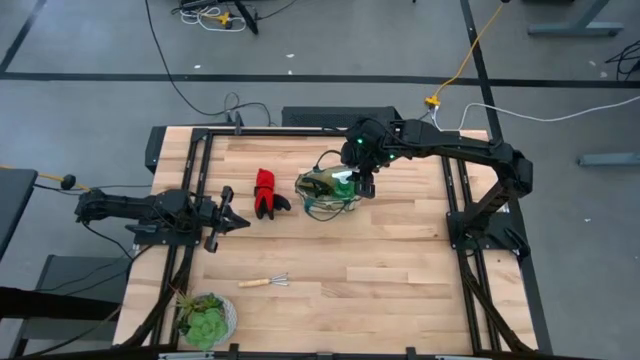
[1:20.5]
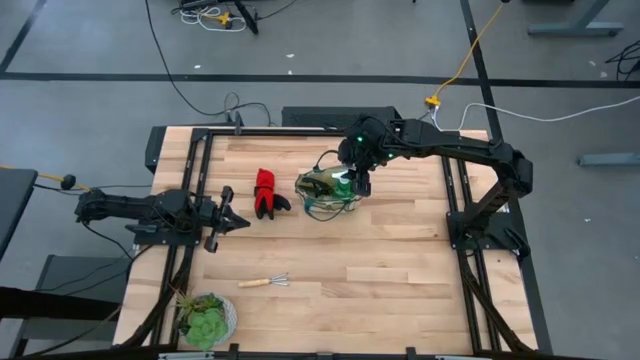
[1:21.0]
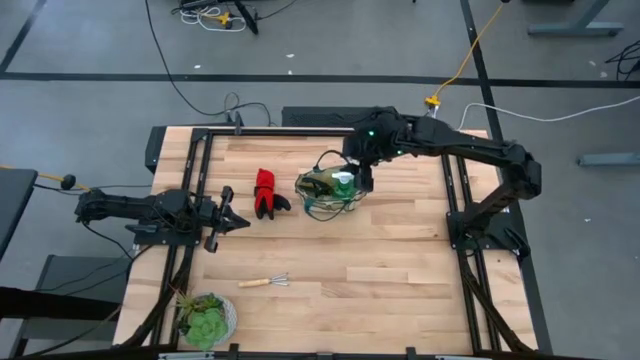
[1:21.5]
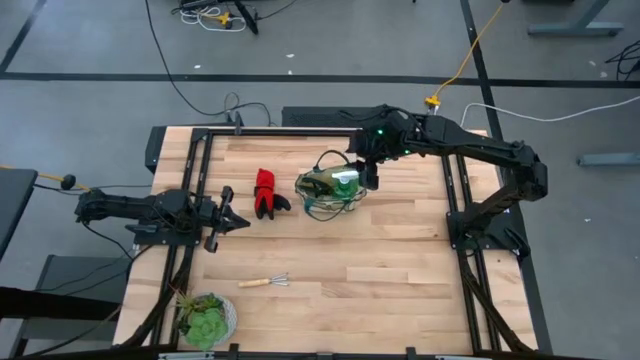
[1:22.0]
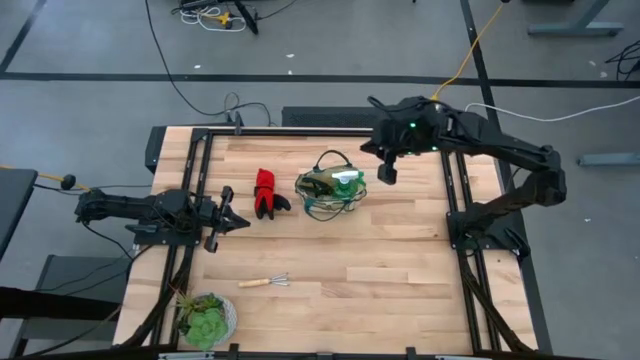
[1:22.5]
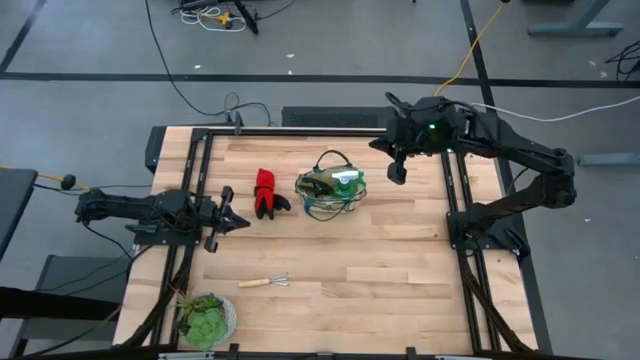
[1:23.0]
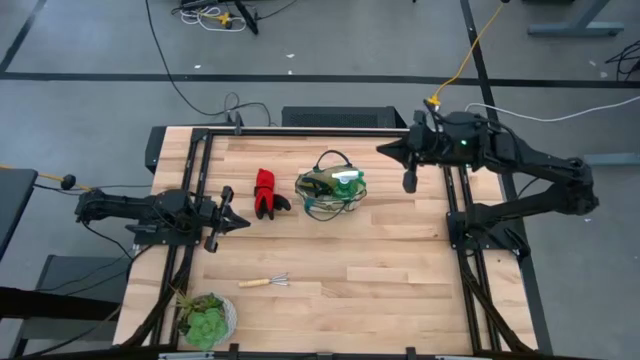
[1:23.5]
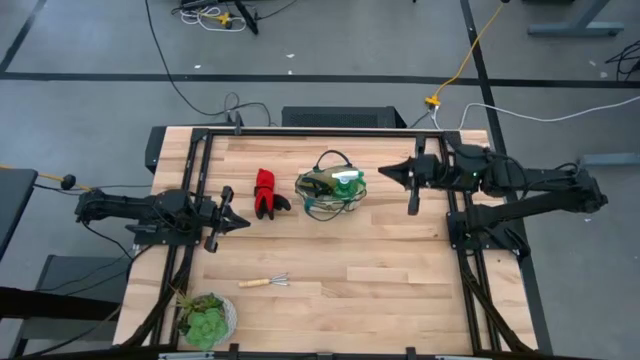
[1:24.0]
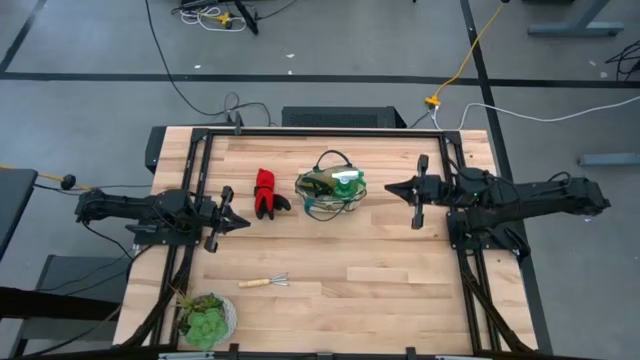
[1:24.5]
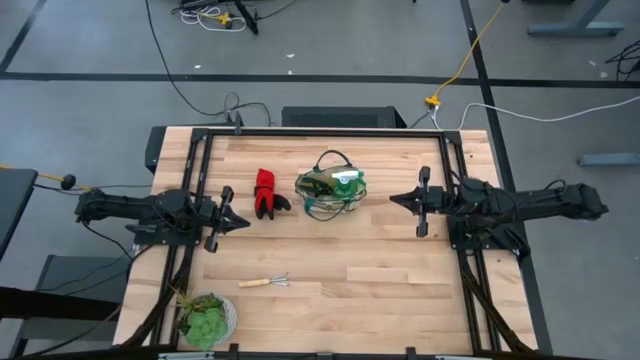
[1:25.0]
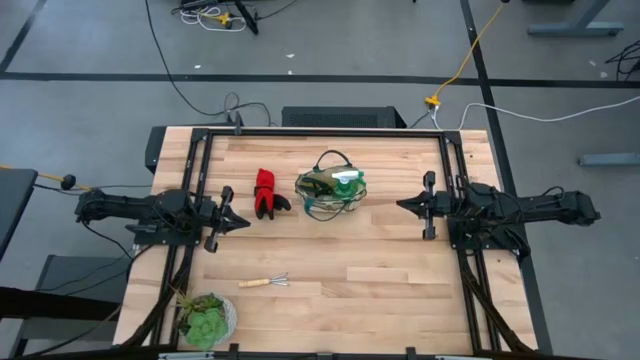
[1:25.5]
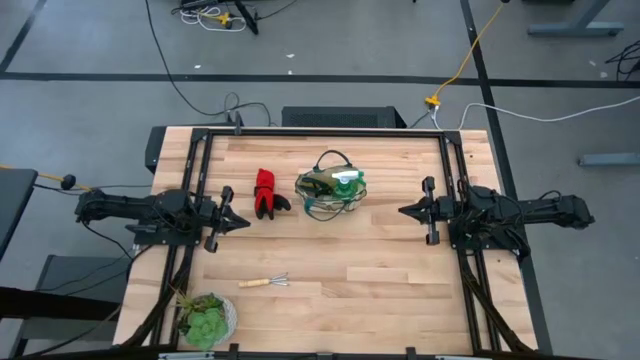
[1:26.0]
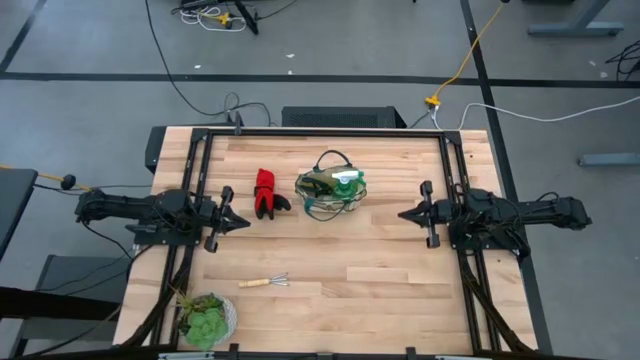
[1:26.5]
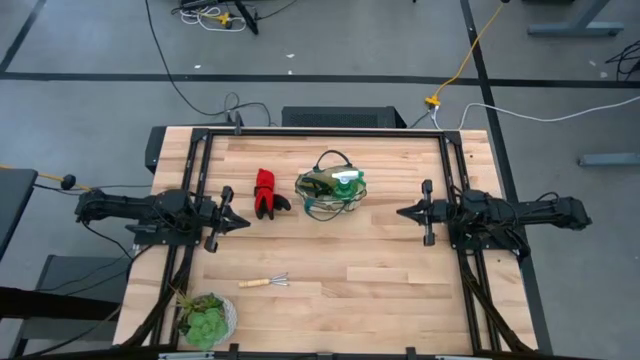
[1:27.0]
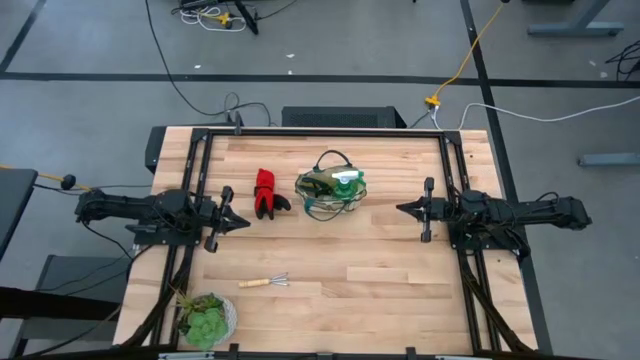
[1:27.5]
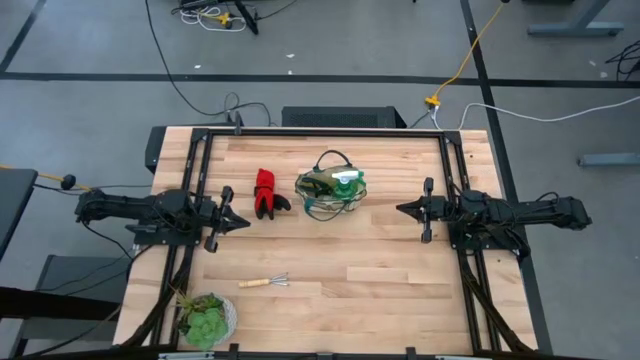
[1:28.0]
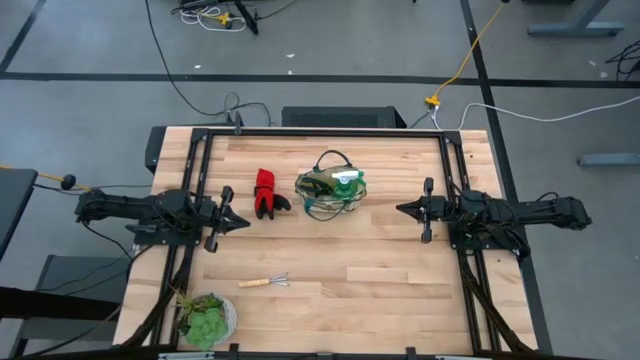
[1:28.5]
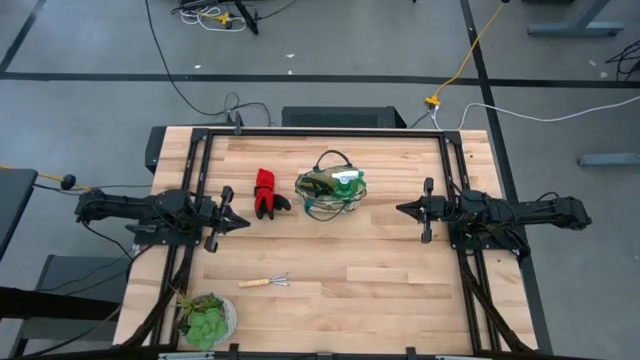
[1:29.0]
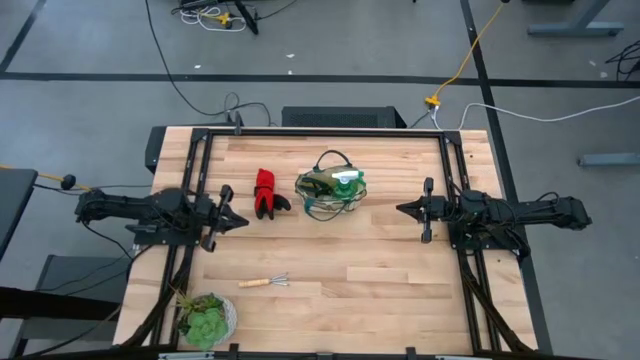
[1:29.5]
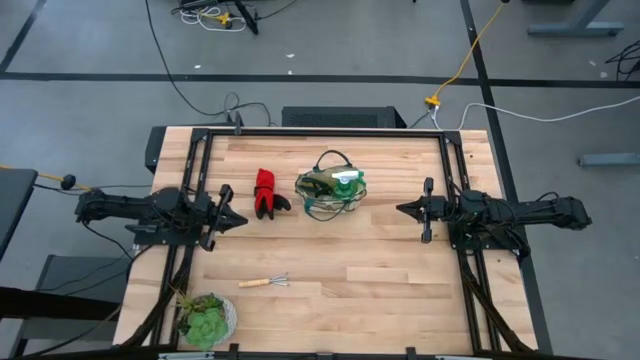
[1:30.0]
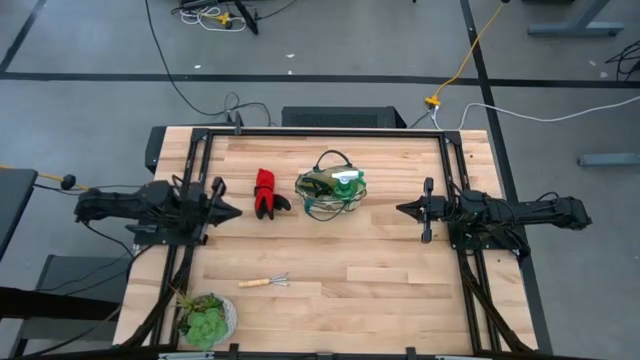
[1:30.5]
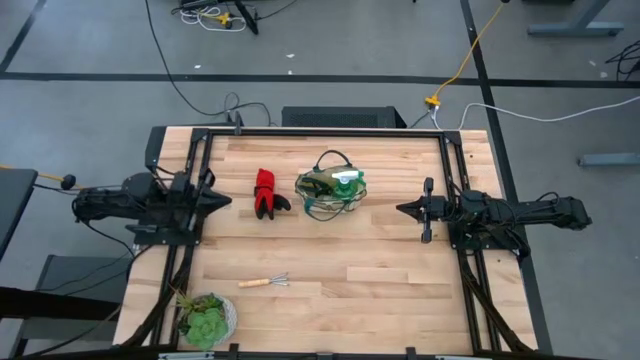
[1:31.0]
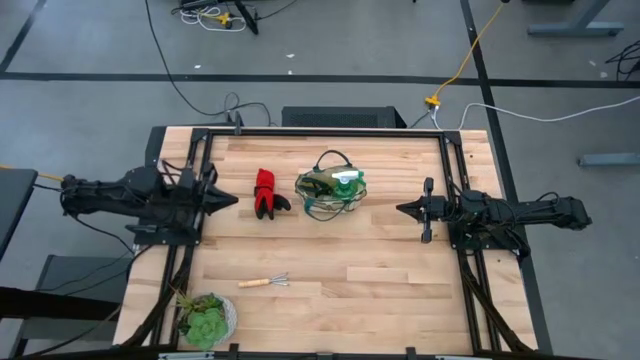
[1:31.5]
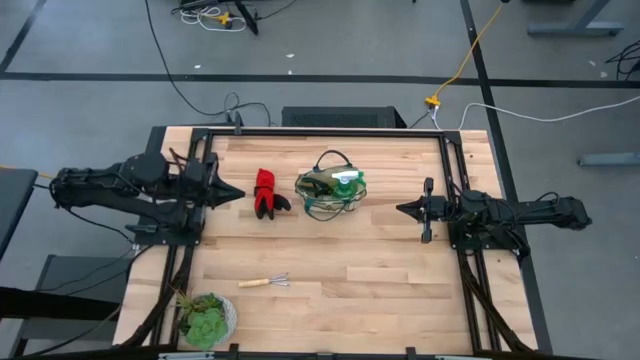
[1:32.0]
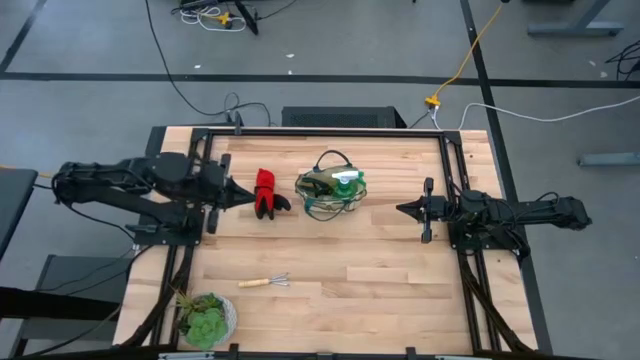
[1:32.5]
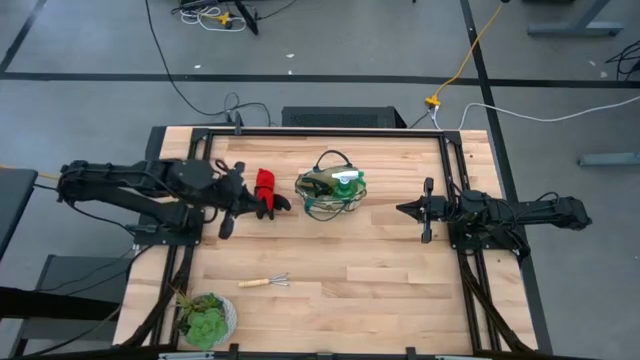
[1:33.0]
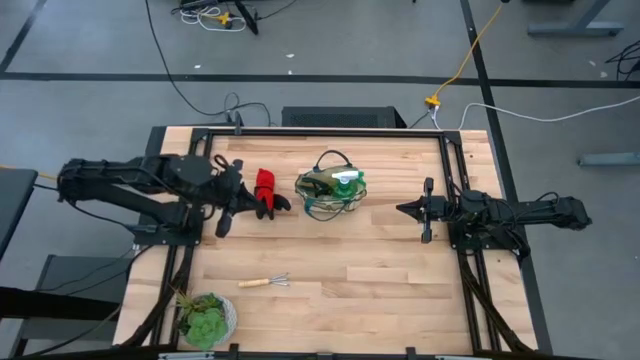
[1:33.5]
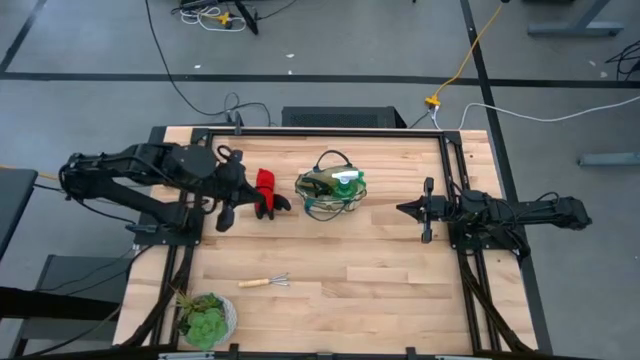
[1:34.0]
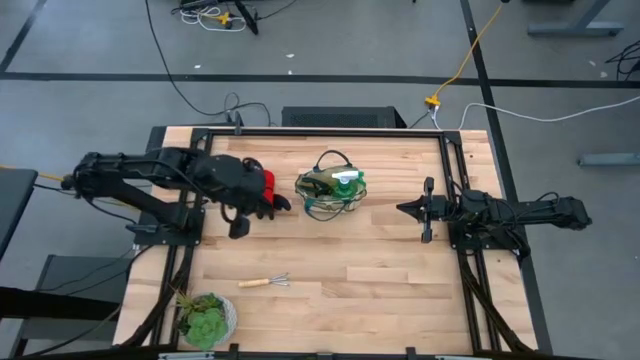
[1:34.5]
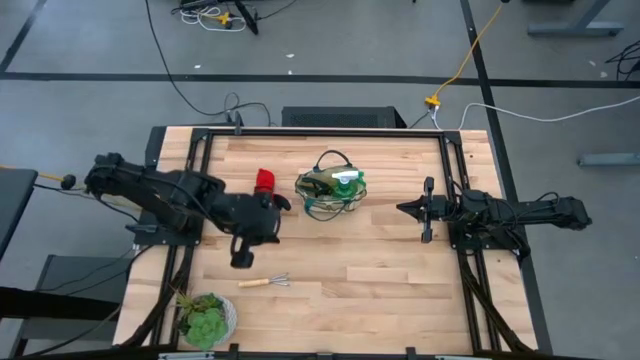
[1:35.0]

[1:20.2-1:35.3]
Task: Pick & Place Garden tools in Gardening bag
Put the brown hand rake into the gardening bag

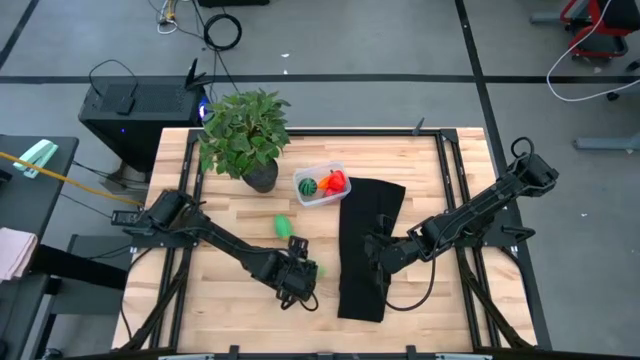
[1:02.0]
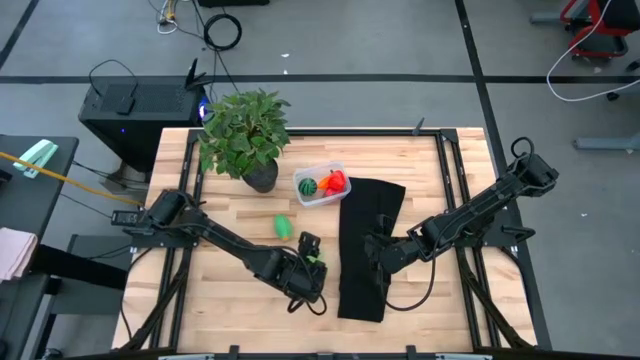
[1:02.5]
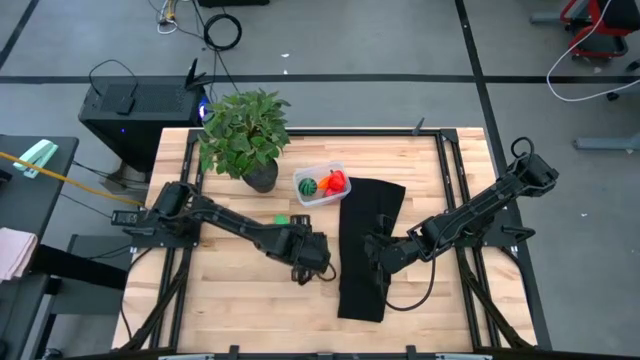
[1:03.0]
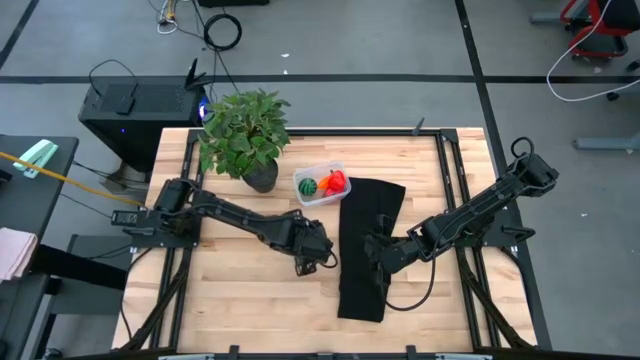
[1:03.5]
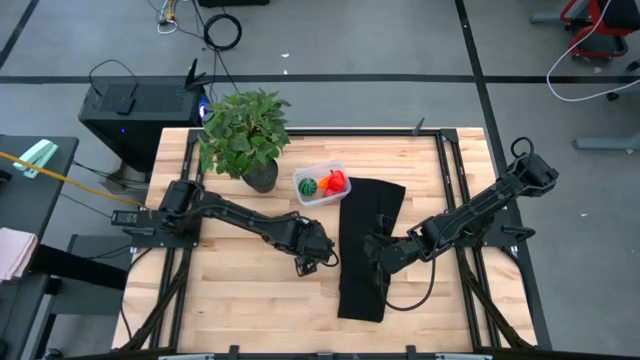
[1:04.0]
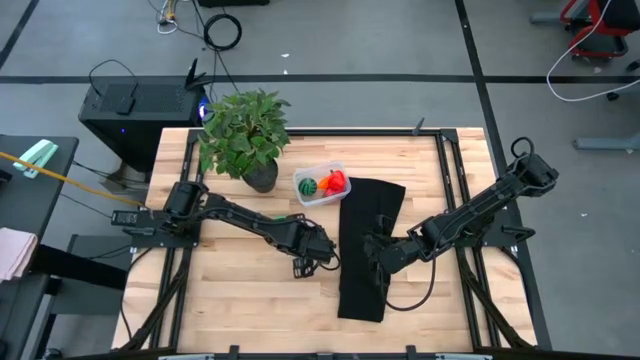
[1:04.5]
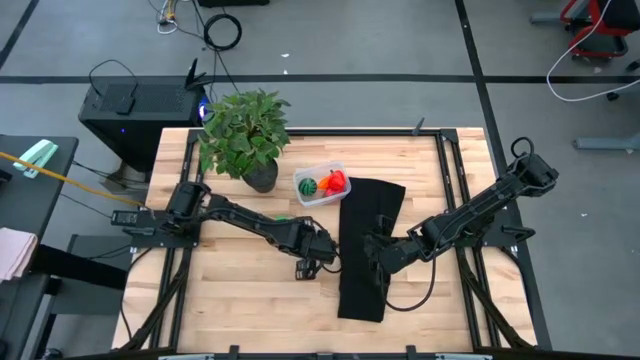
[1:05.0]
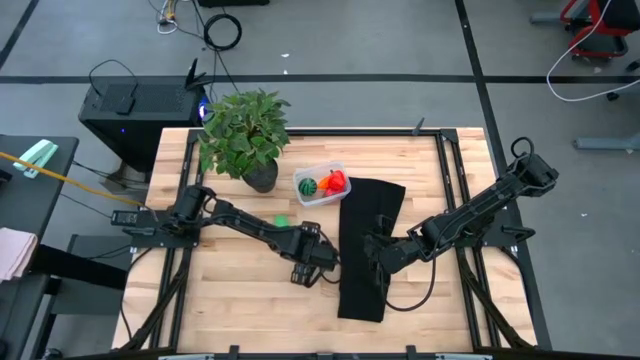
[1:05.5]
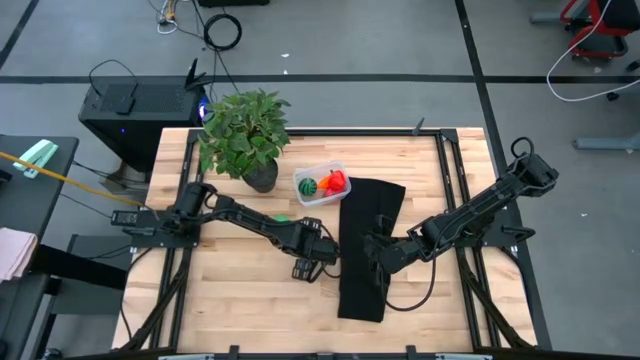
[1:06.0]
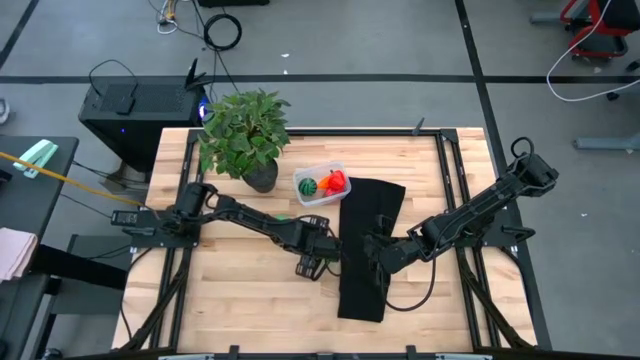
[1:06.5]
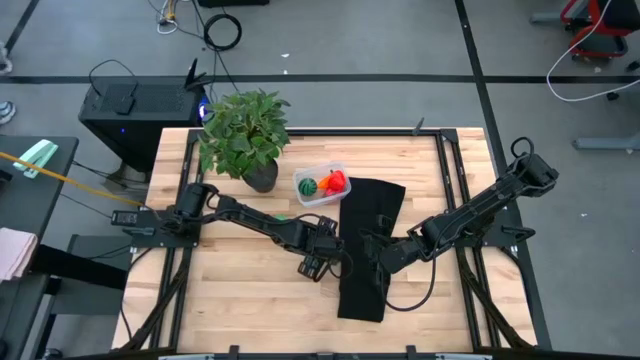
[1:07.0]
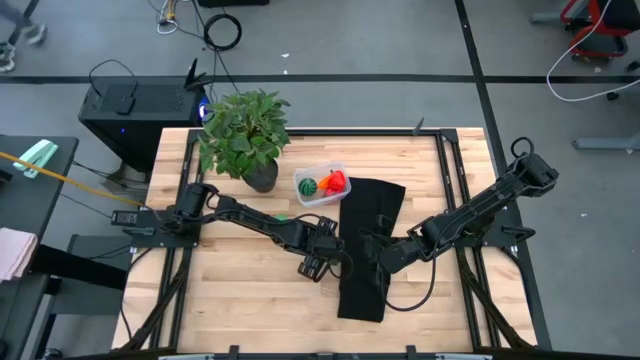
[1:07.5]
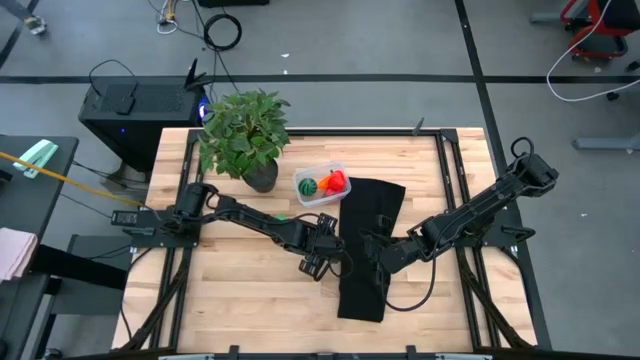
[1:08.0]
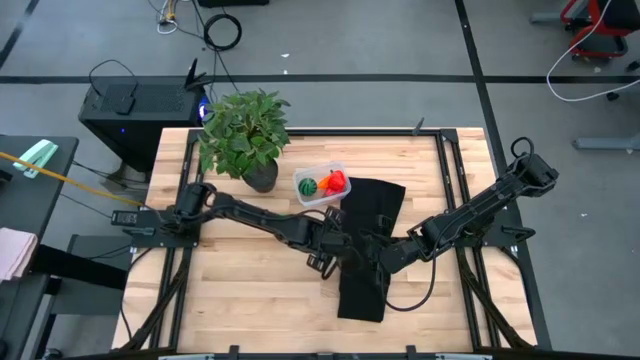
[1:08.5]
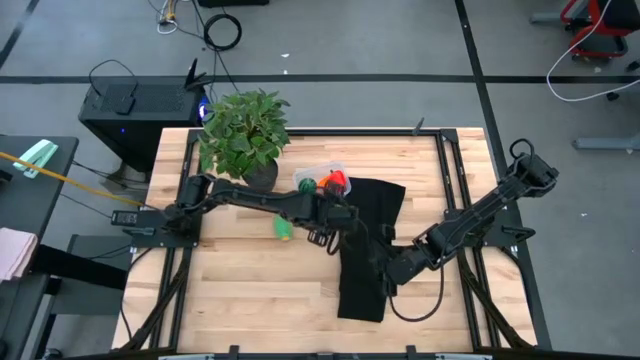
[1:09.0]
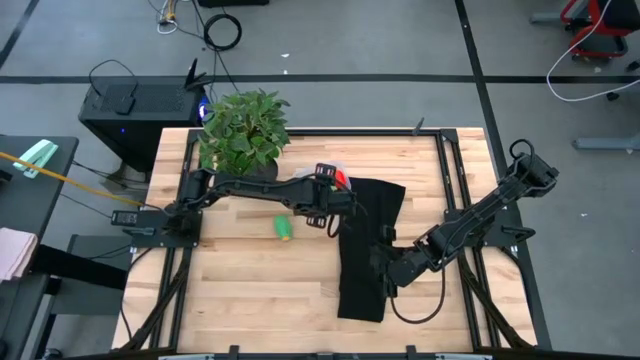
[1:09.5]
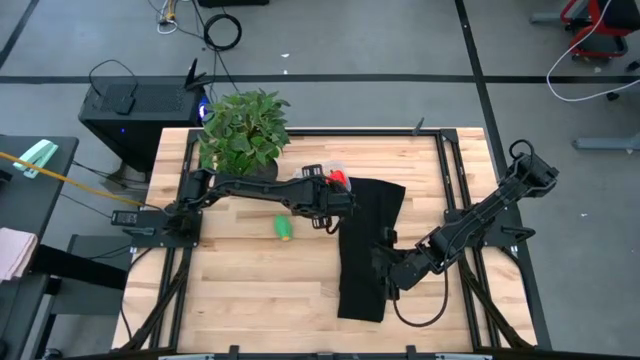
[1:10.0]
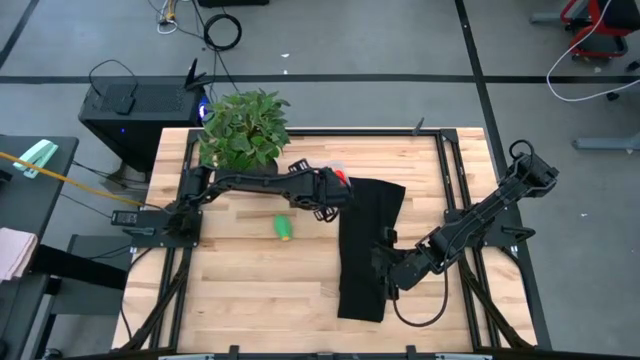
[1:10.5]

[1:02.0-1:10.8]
Task: Pick and placing Produce into tupperware
Put the green melon into the transparent bin
